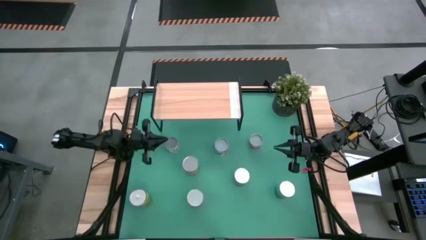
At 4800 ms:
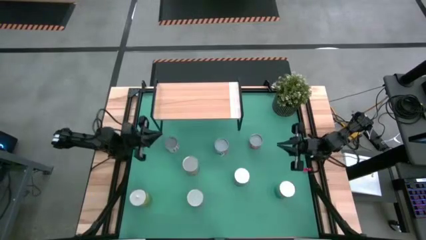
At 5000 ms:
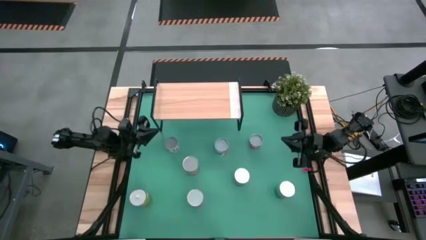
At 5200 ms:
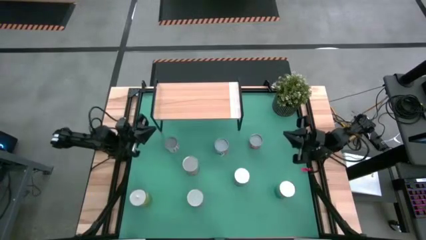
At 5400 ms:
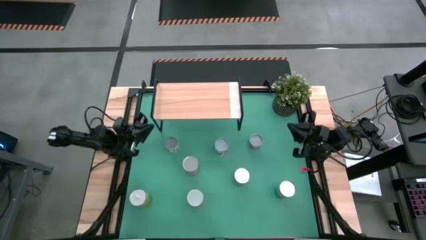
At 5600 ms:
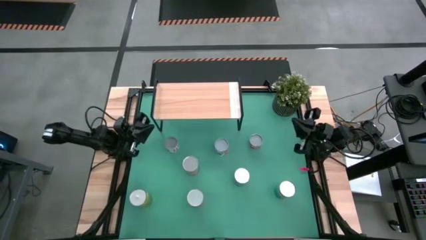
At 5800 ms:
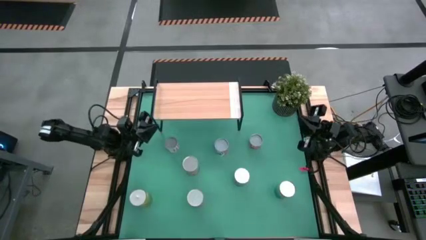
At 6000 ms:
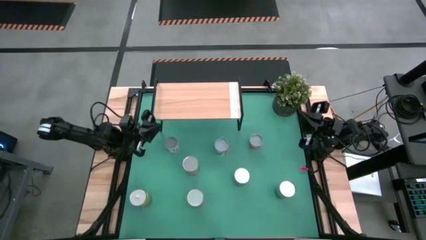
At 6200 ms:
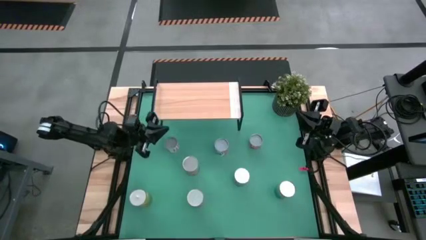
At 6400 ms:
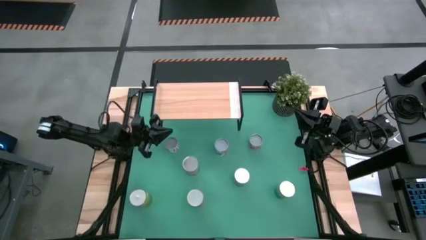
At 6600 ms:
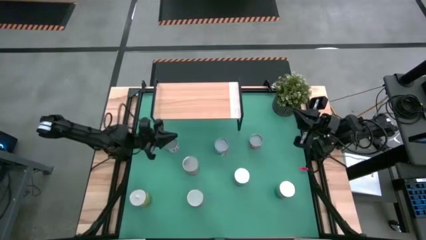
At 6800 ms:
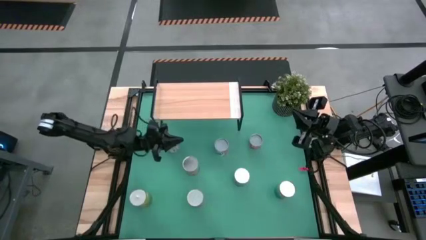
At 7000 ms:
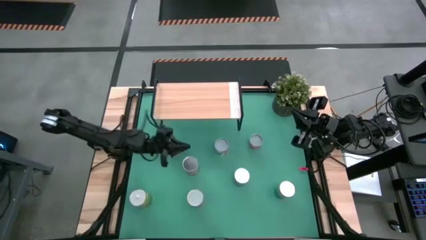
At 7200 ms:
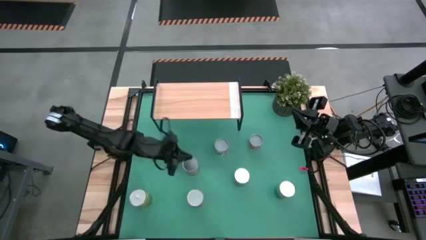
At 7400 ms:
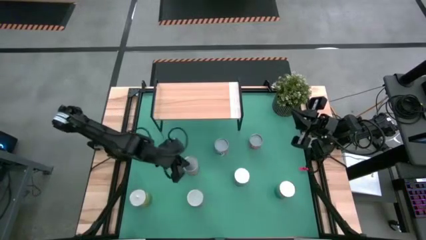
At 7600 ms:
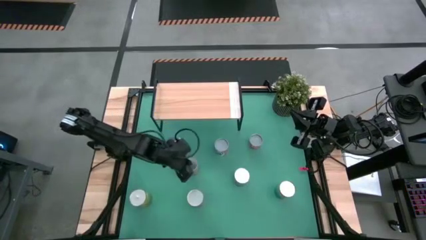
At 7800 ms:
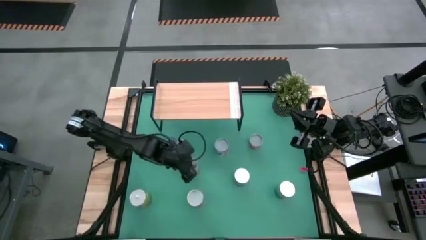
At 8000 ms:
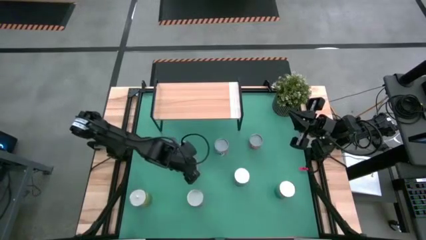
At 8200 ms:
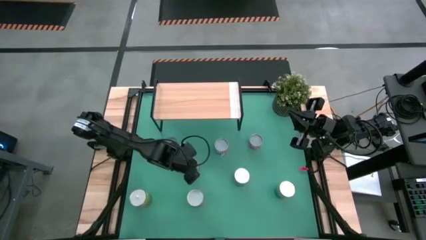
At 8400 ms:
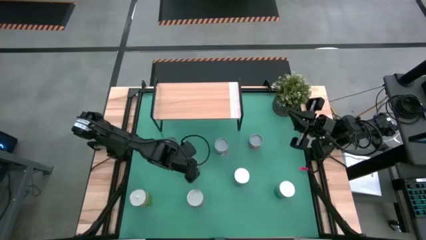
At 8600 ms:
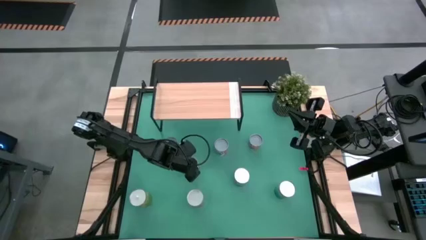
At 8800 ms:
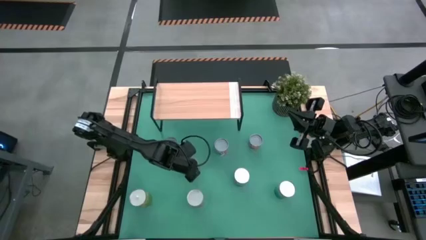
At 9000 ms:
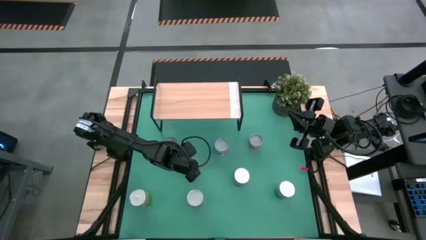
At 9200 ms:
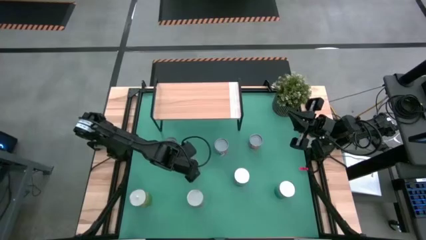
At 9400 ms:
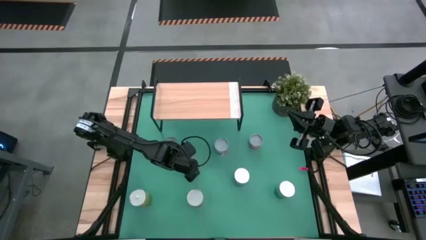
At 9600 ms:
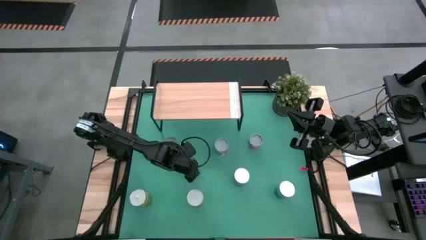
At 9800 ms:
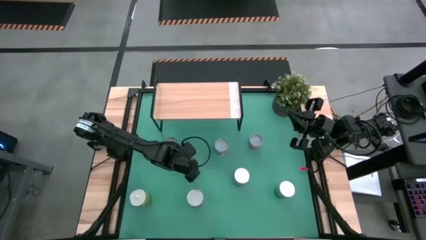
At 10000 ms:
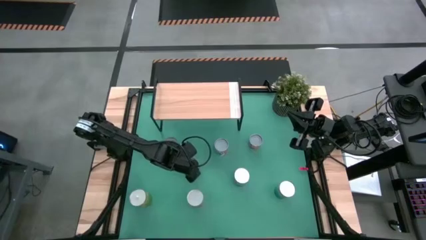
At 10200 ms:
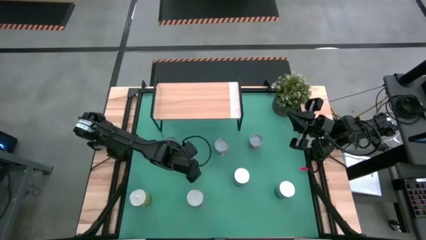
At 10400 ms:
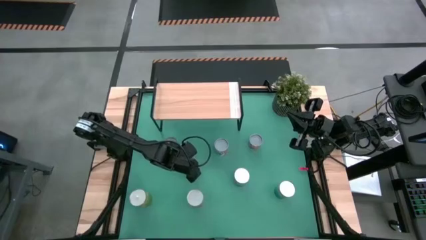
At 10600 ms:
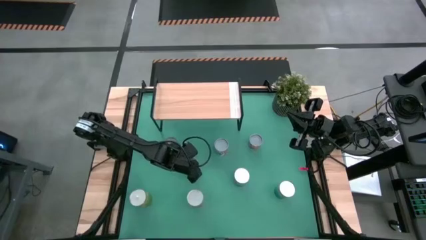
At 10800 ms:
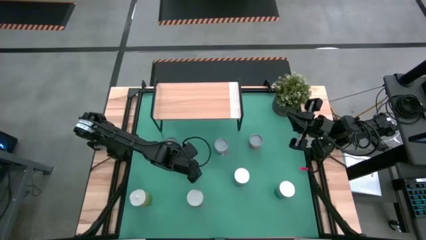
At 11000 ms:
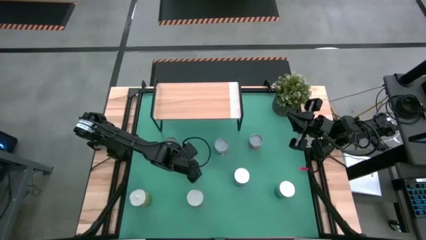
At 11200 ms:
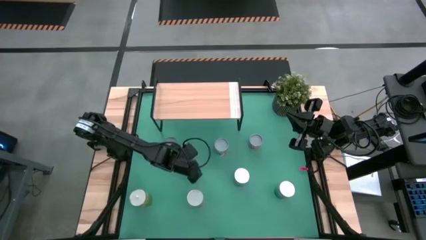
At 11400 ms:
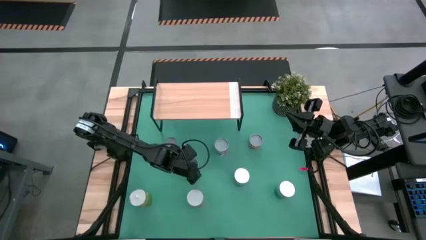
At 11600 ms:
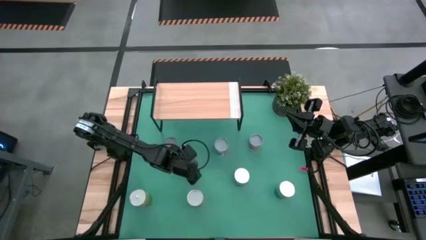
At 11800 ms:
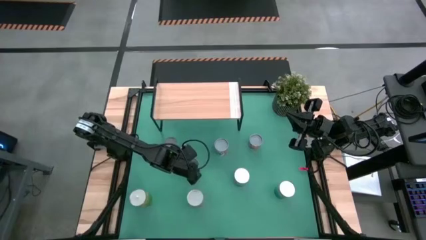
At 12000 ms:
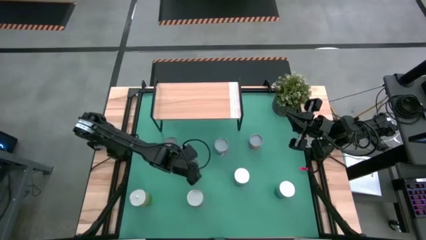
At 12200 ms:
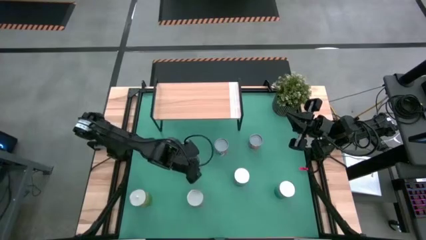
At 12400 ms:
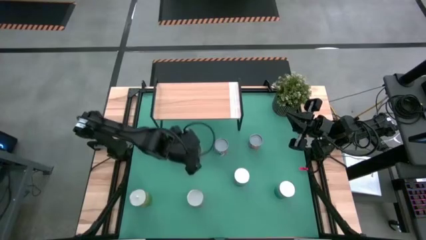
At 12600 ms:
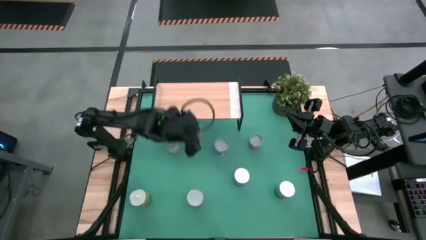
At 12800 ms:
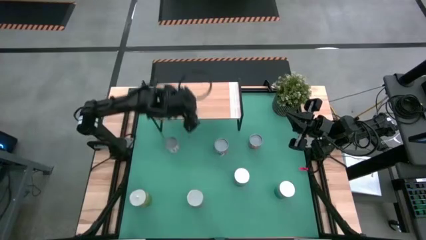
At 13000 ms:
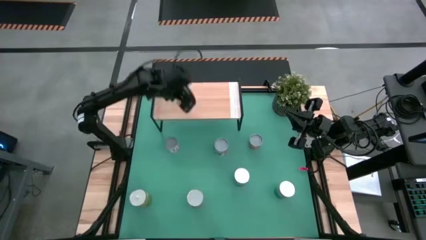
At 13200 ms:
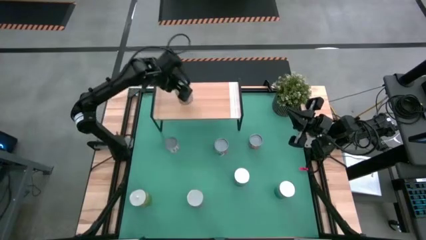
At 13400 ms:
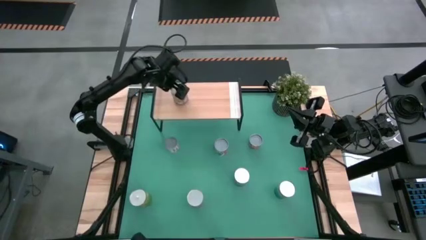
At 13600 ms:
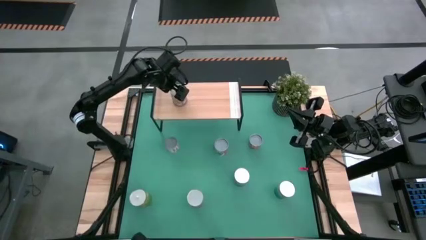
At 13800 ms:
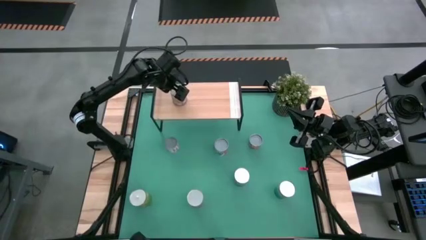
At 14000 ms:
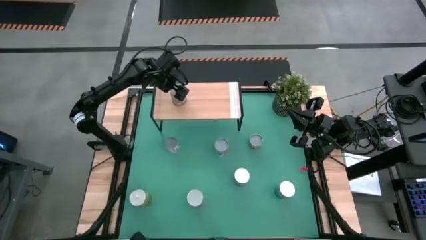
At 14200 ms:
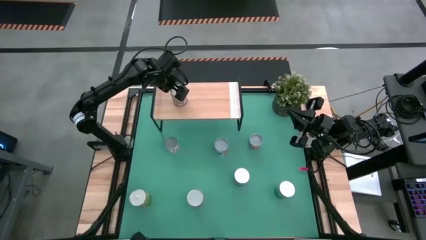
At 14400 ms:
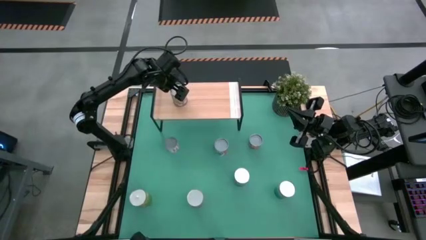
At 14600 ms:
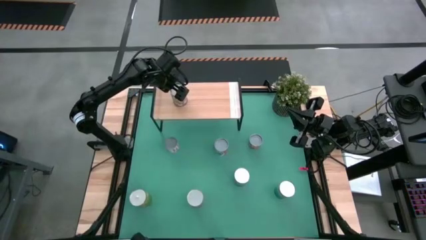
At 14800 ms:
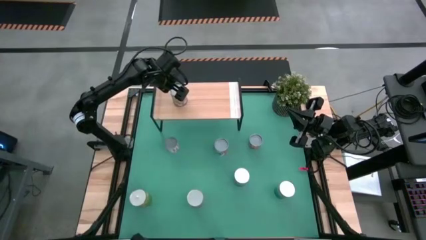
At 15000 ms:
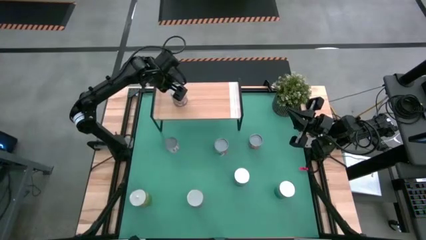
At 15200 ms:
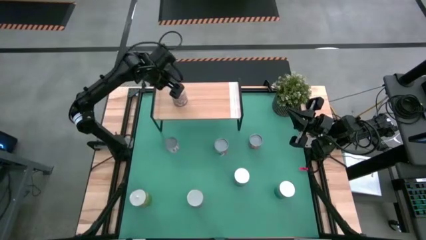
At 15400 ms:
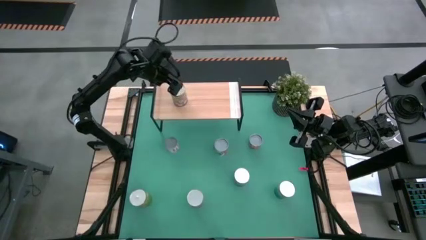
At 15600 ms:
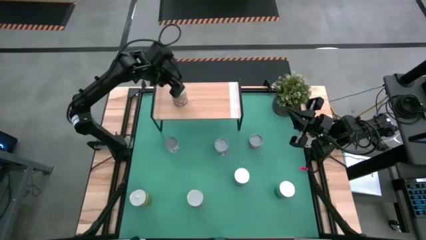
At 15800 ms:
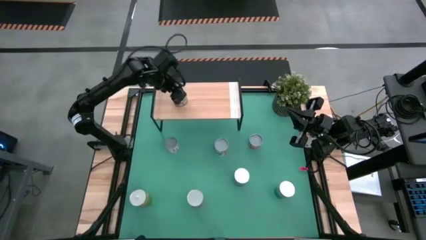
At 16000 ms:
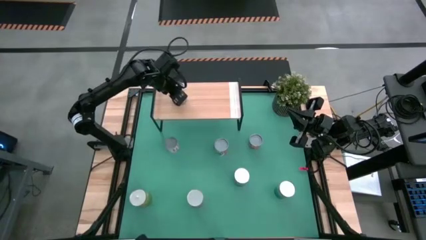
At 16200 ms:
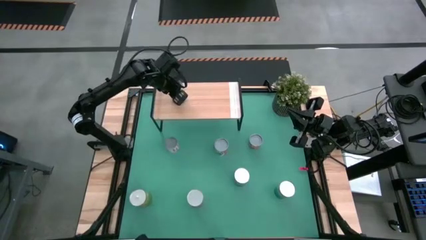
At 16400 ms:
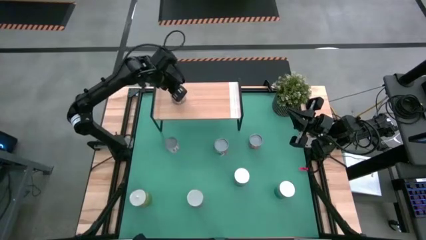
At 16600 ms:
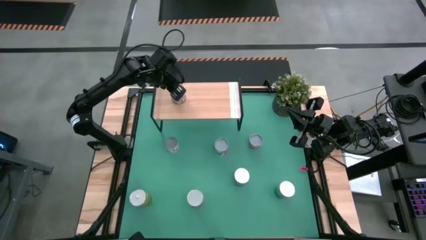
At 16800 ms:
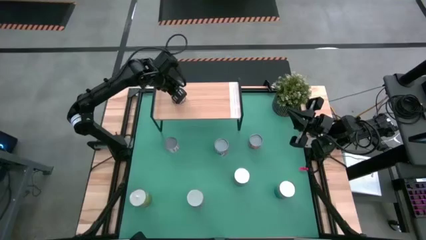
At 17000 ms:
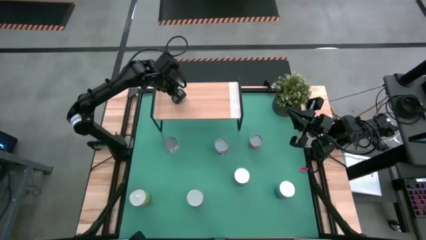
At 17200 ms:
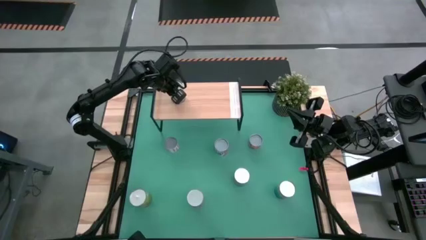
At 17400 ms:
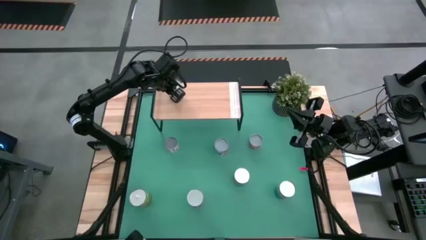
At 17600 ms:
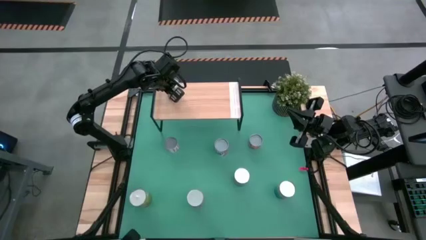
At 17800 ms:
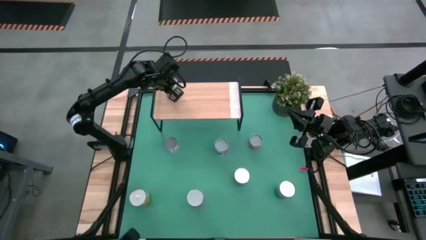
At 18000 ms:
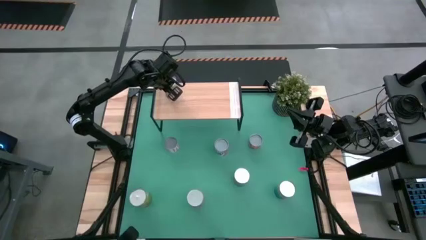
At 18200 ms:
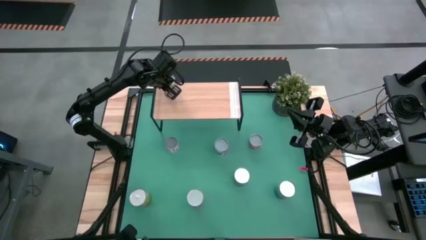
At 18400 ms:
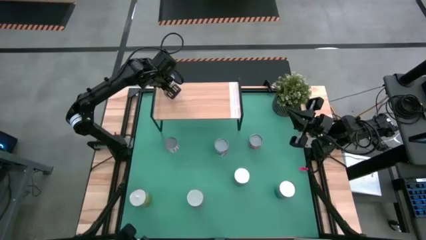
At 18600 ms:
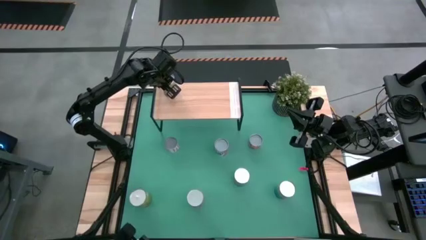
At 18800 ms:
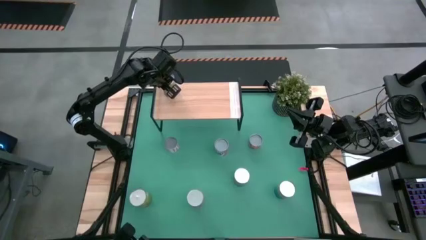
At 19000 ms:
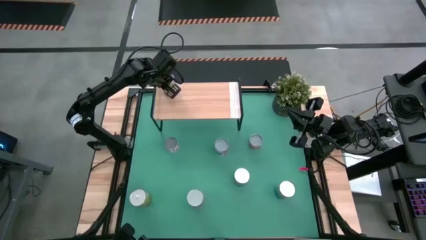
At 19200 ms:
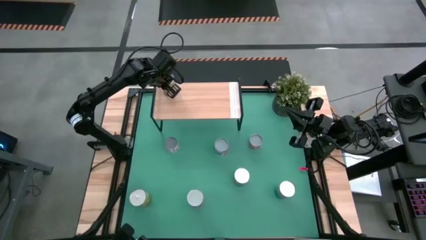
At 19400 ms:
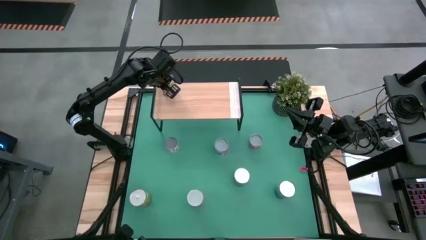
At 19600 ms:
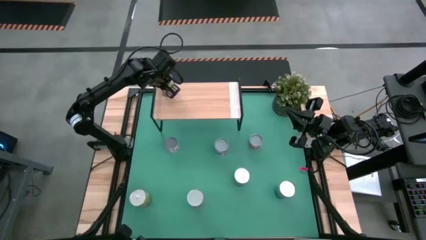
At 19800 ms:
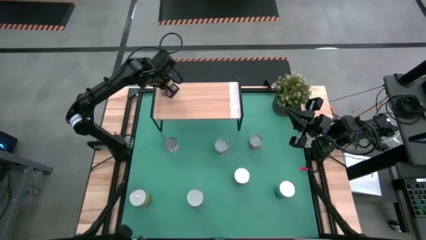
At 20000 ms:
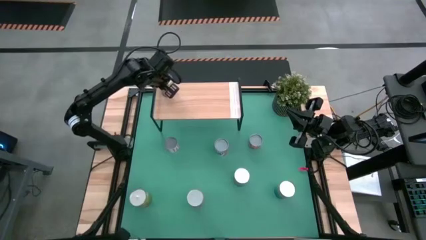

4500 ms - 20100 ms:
Task: Pick and place cans onto a shelf
Put the canned peaches on the shelf
